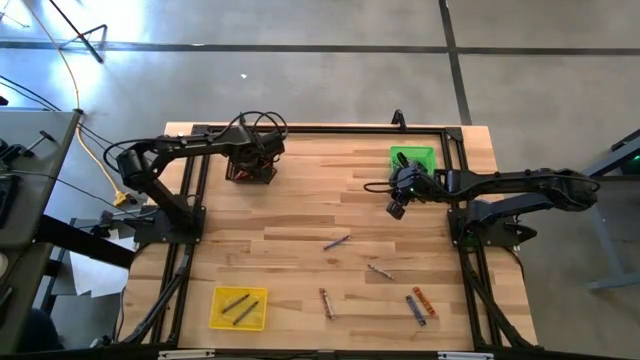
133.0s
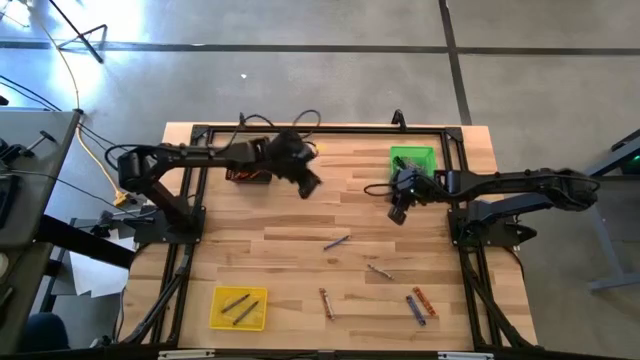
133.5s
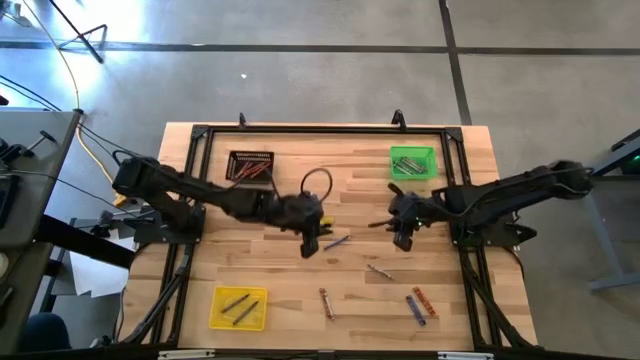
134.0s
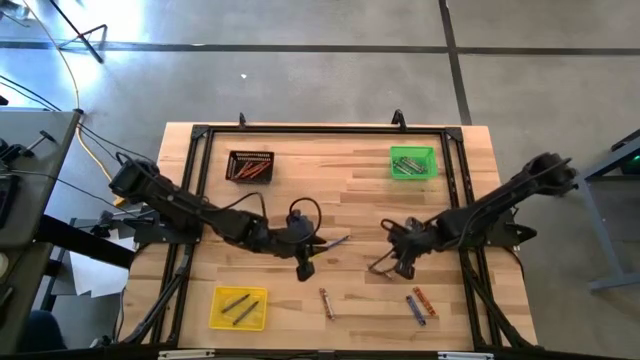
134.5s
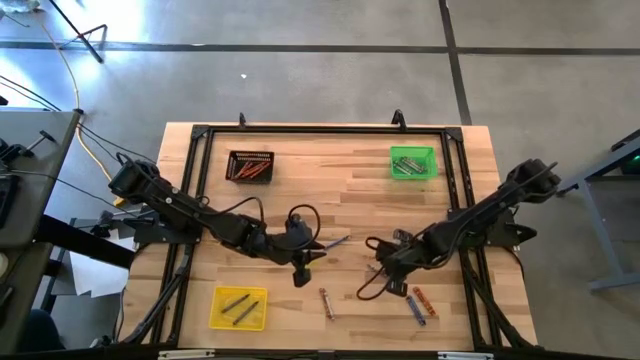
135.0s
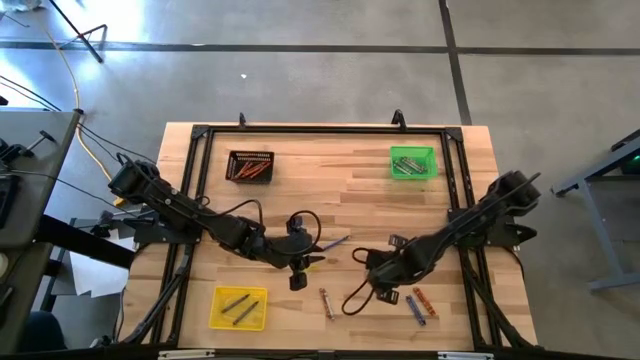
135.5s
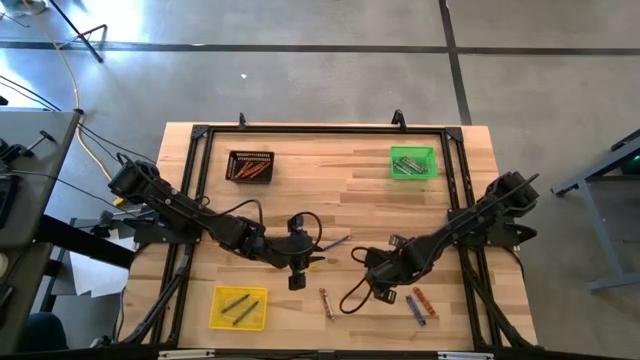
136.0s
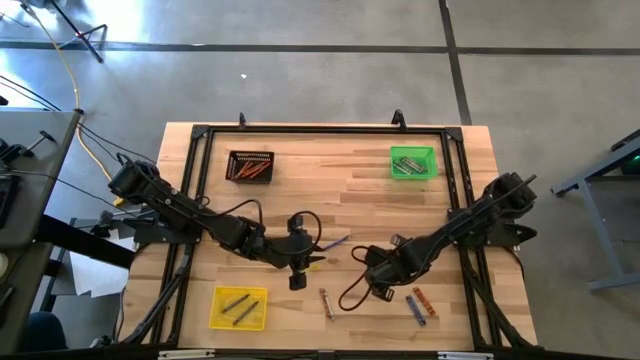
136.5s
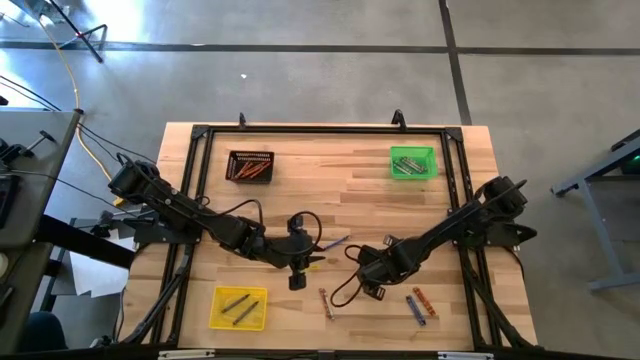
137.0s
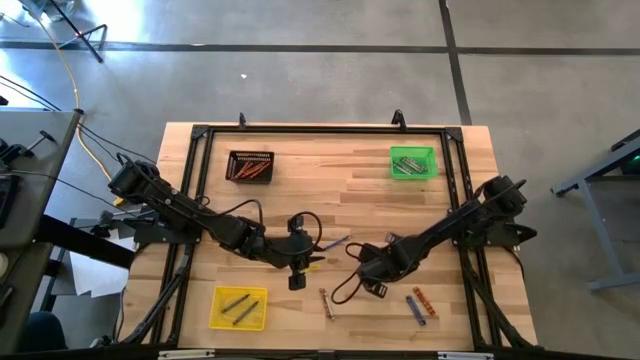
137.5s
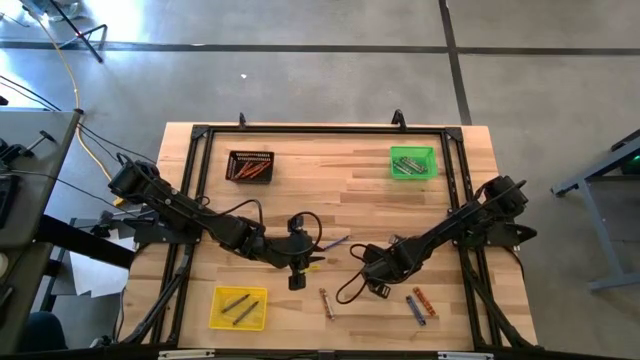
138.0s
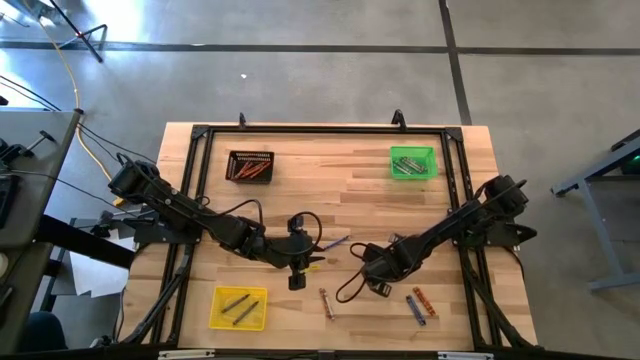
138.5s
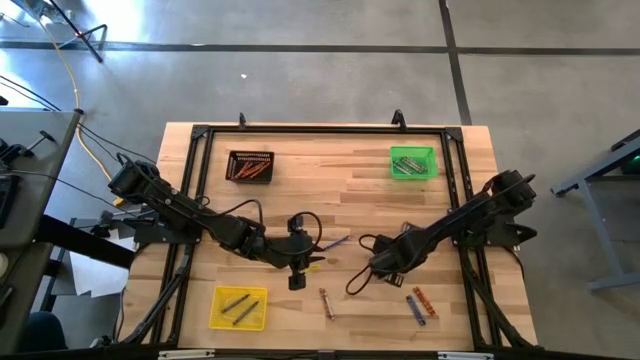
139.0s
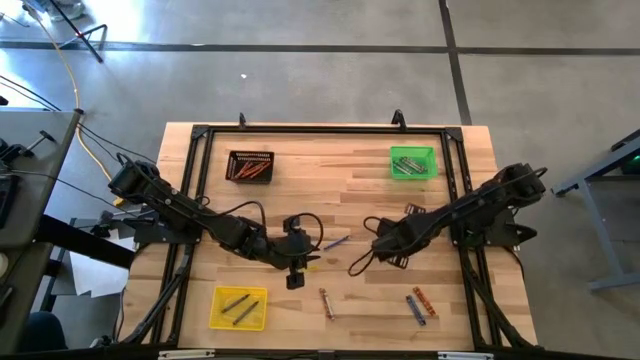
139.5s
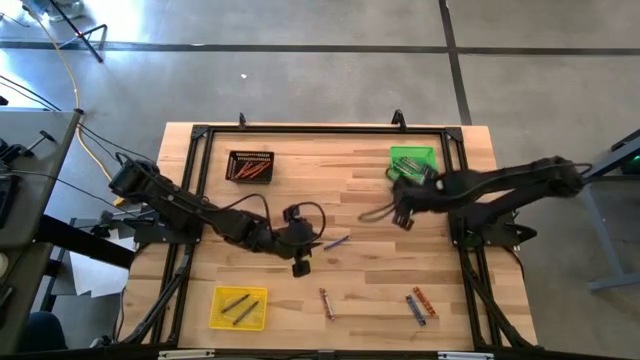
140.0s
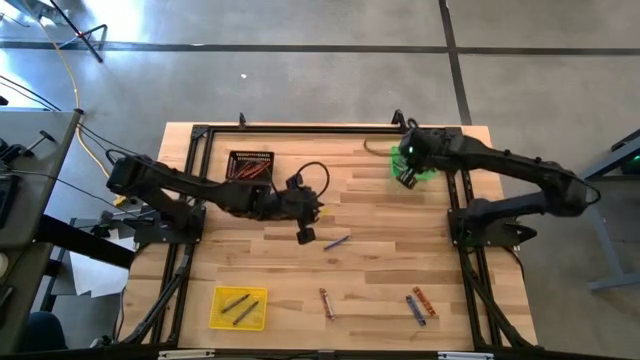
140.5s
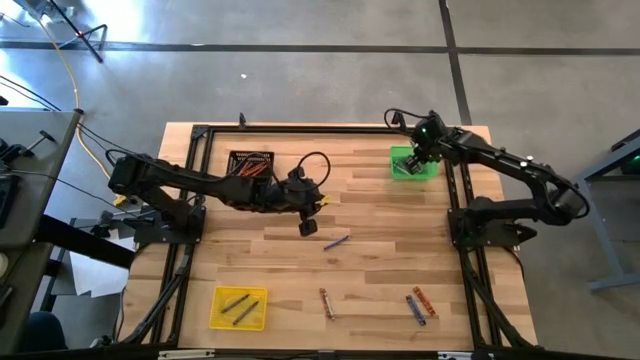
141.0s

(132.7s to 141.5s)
Task: Sort crayons
Put the gray crayon into the green bin

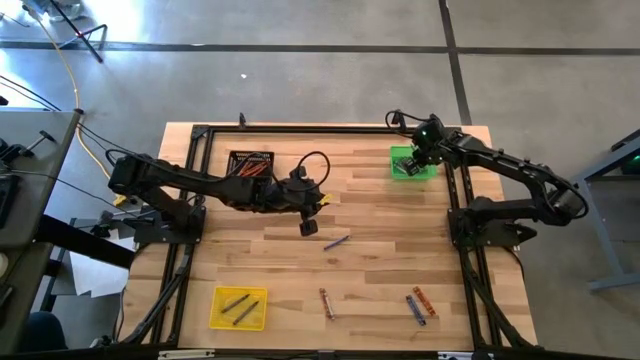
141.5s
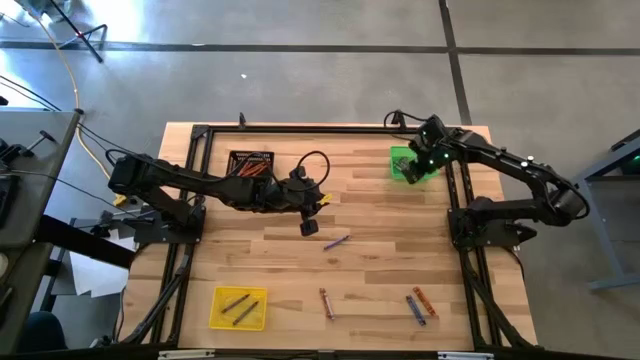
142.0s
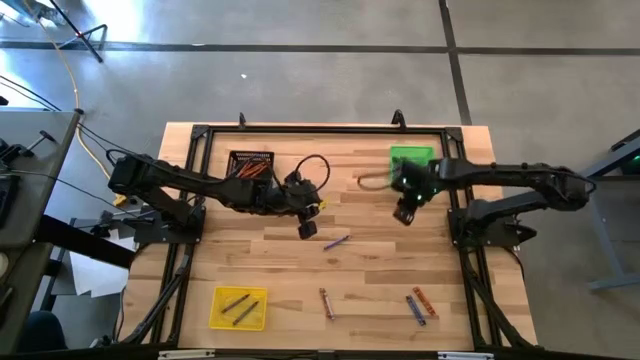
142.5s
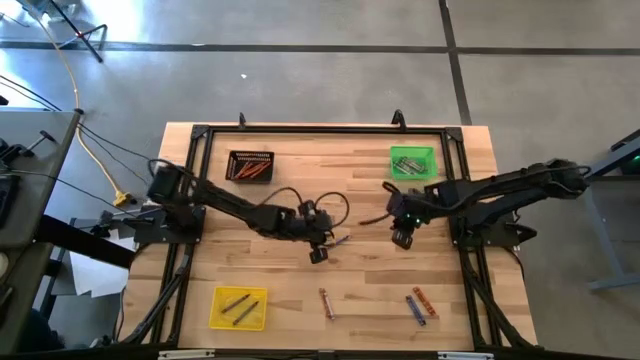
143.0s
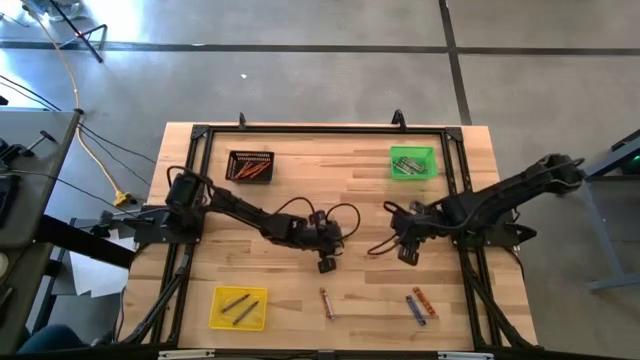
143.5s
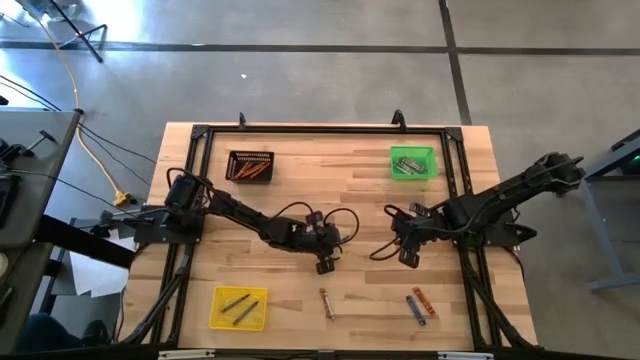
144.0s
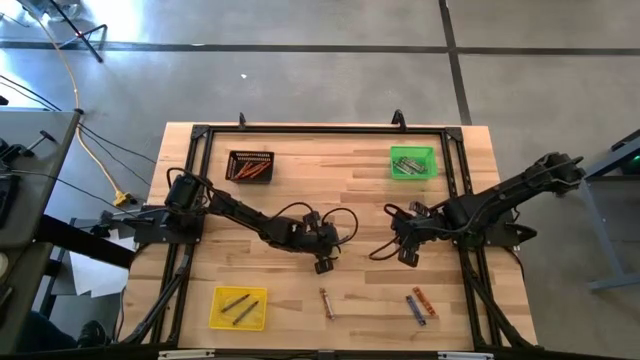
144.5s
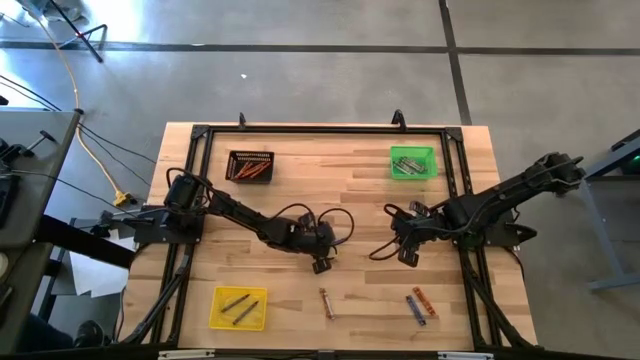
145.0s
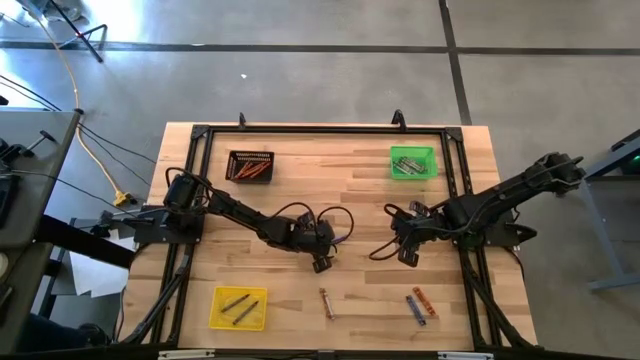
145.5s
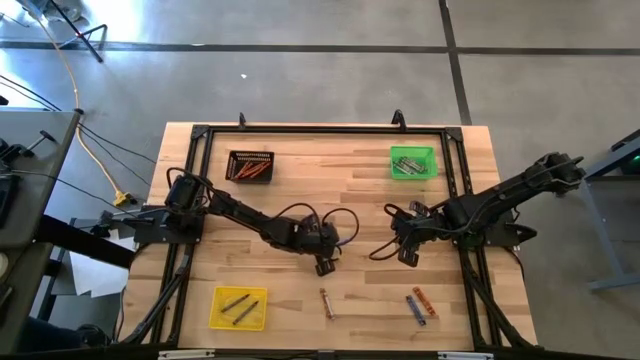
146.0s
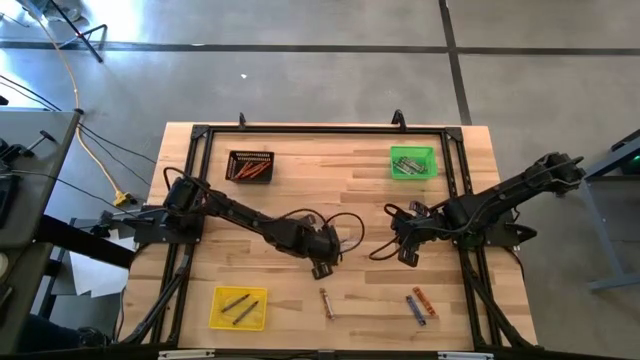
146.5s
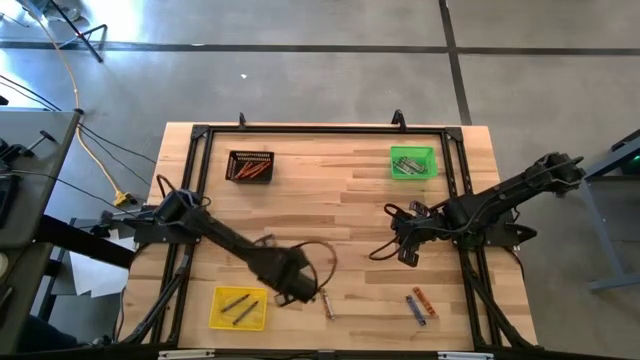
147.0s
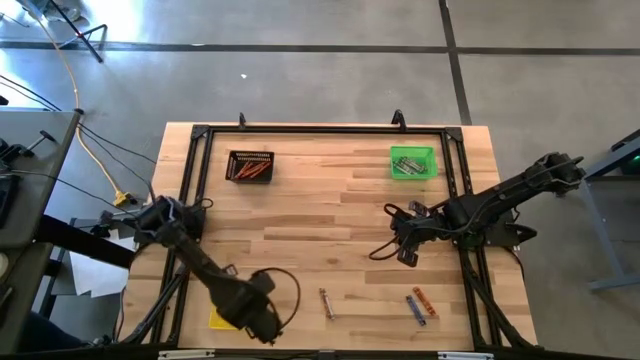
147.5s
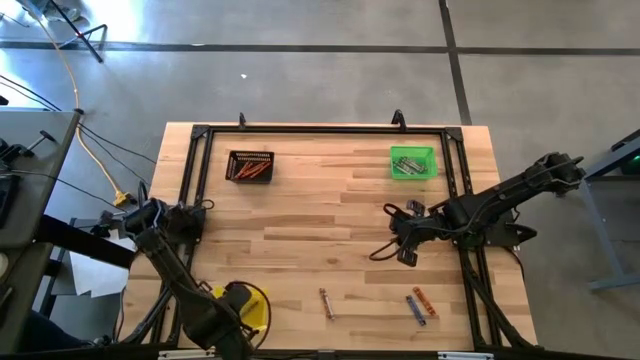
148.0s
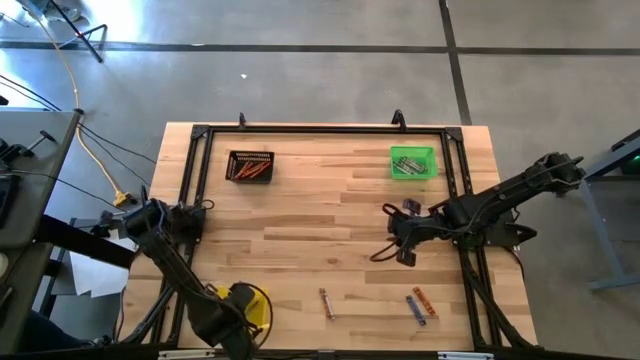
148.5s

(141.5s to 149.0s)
Put the blue crayon into the yellow bin

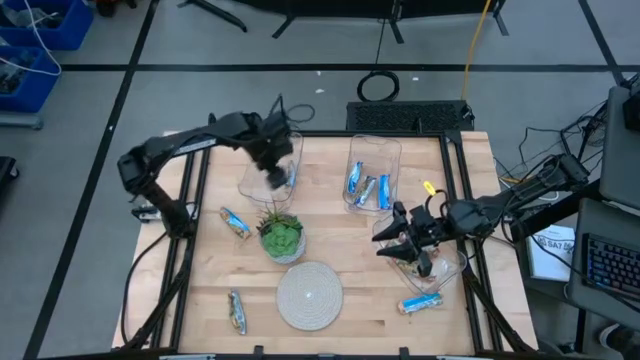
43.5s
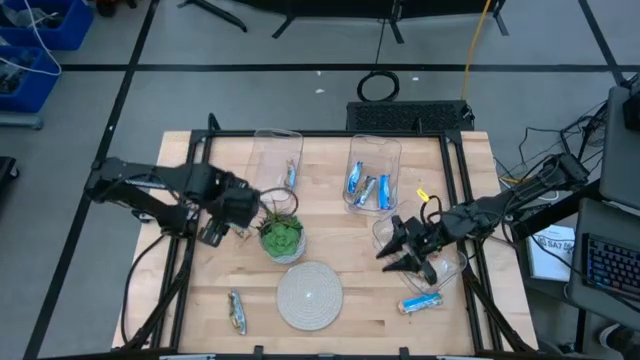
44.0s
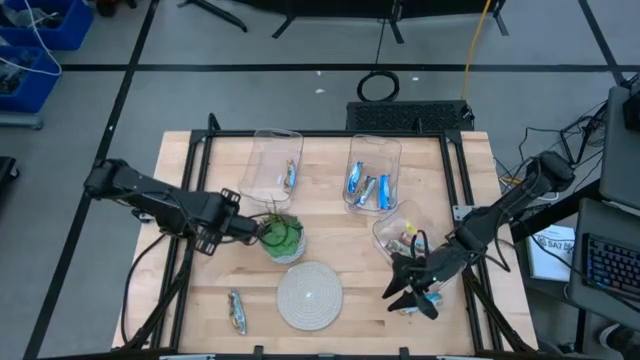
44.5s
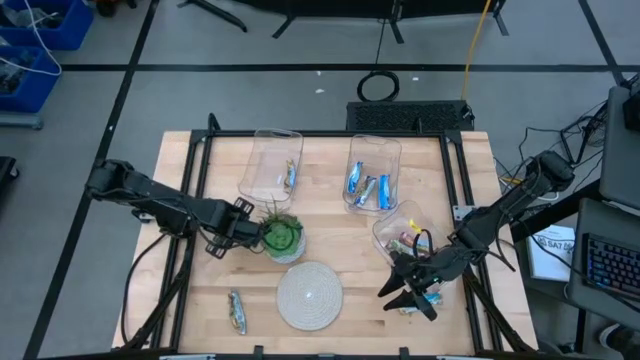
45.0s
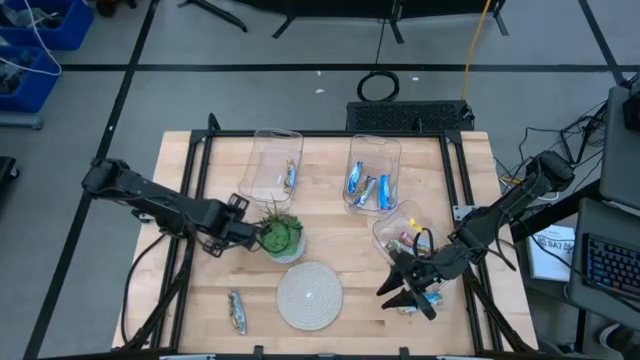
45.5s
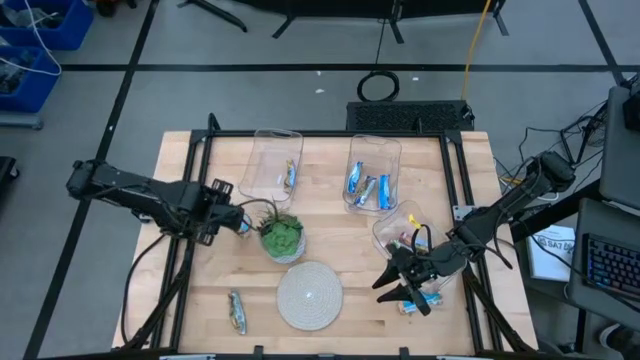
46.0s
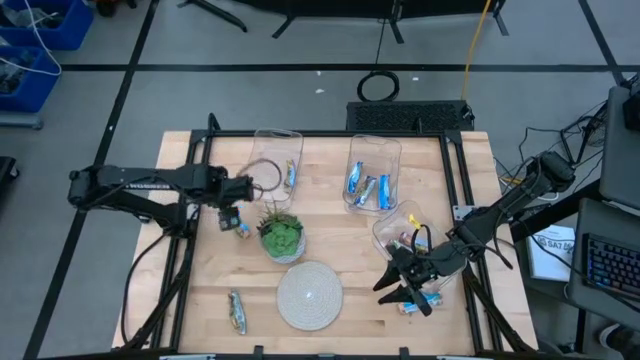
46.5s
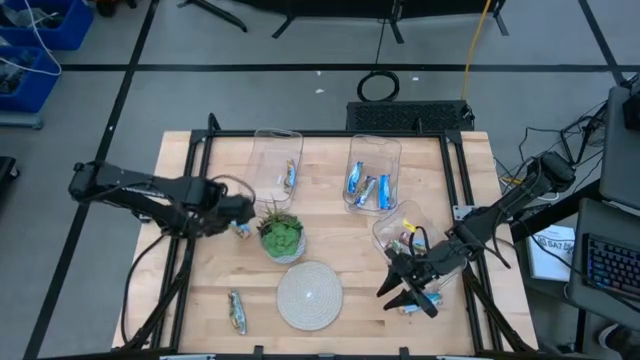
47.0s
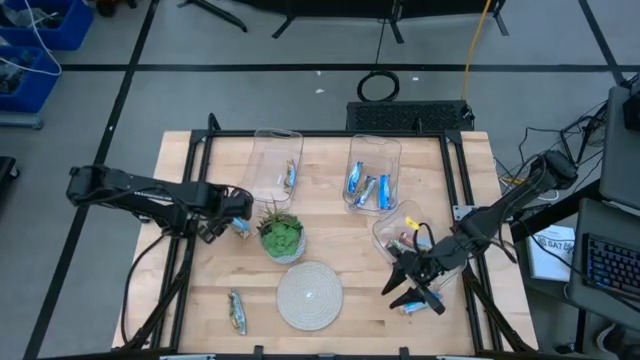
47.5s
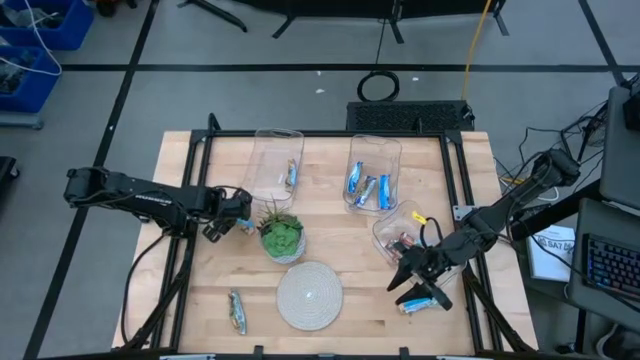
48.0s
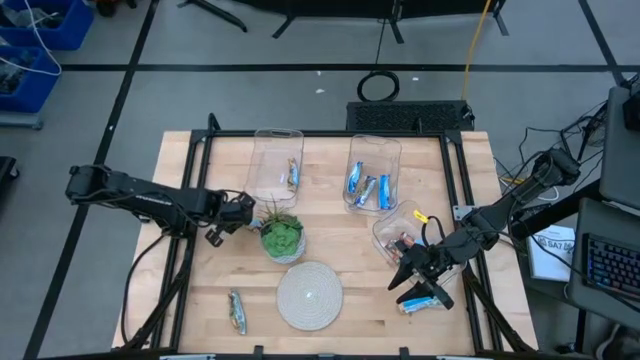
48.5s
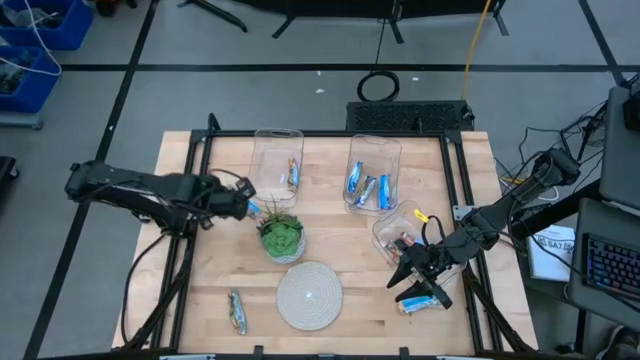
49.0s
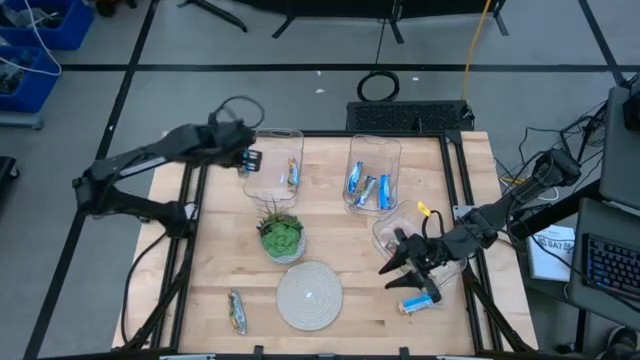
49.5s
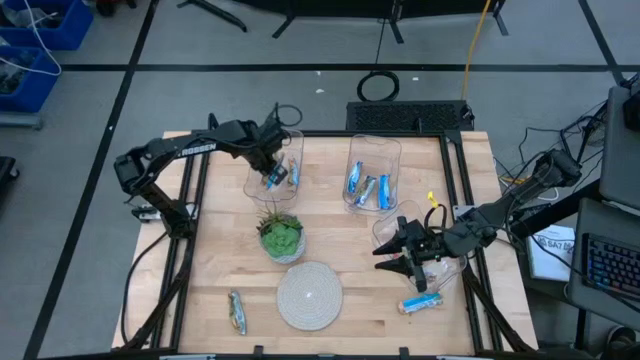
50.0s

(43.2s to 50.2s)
Task: Pick and place Granola Bars by type
Put the yellow granola bar into the top left transparent bin
